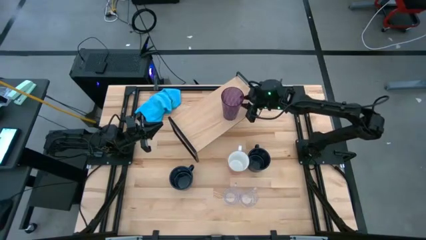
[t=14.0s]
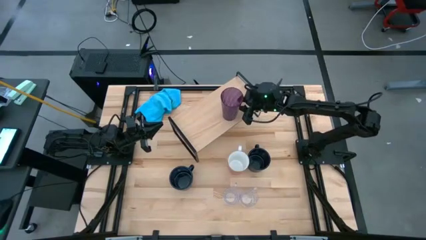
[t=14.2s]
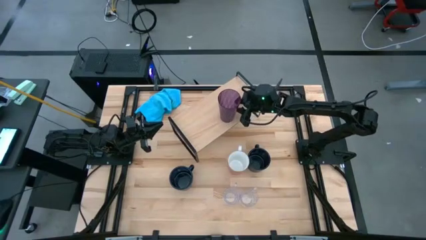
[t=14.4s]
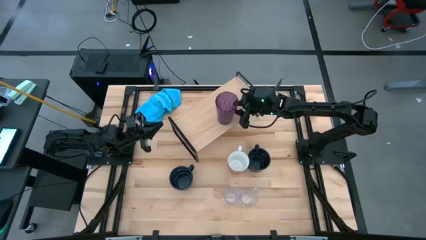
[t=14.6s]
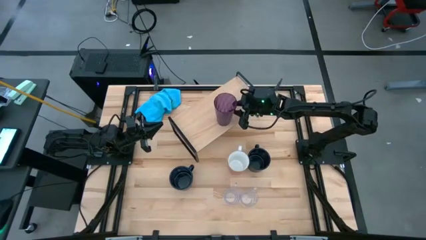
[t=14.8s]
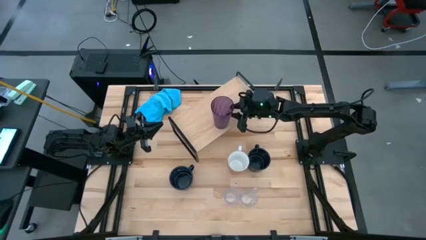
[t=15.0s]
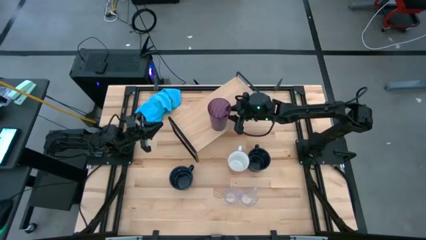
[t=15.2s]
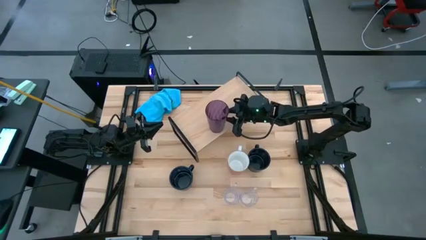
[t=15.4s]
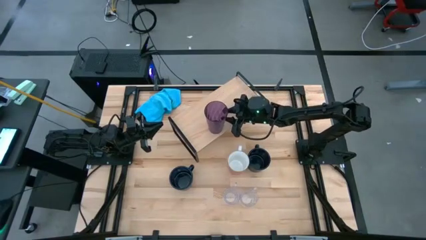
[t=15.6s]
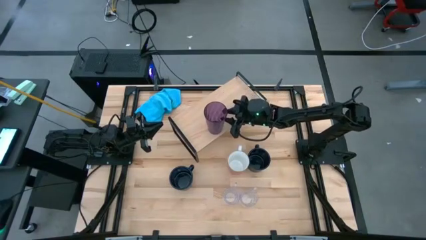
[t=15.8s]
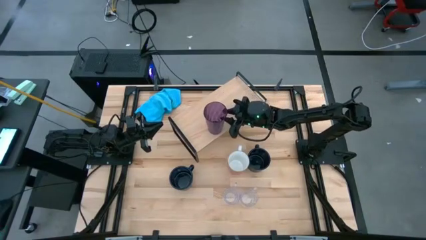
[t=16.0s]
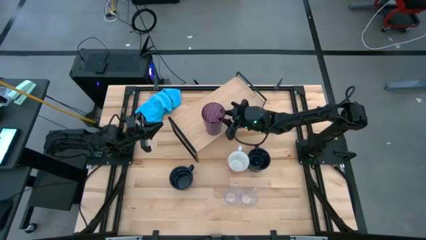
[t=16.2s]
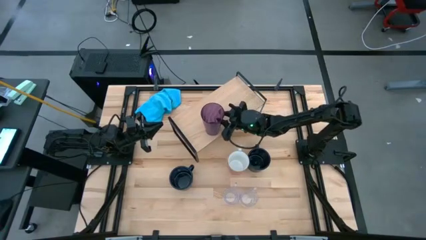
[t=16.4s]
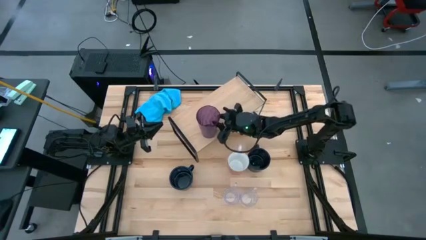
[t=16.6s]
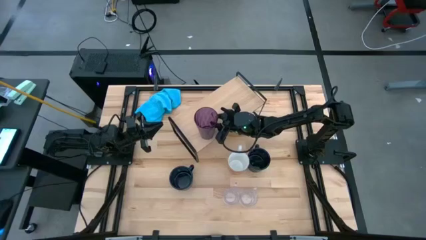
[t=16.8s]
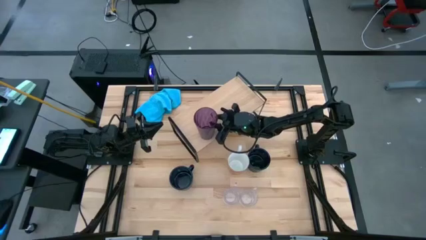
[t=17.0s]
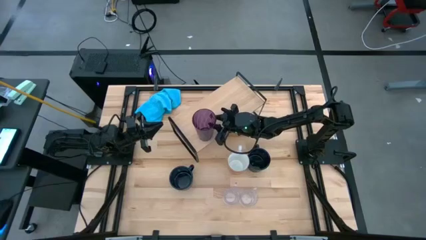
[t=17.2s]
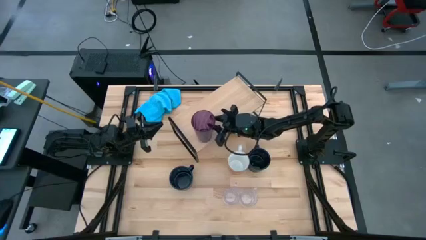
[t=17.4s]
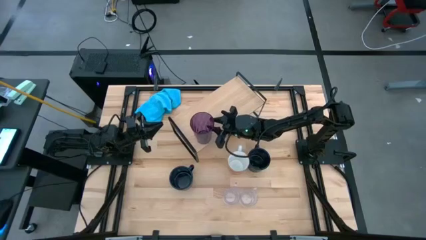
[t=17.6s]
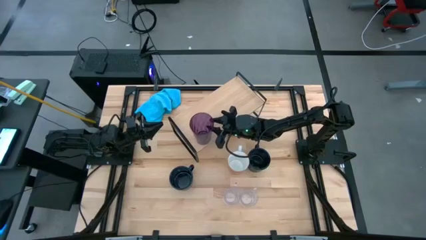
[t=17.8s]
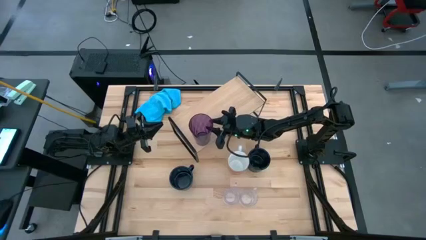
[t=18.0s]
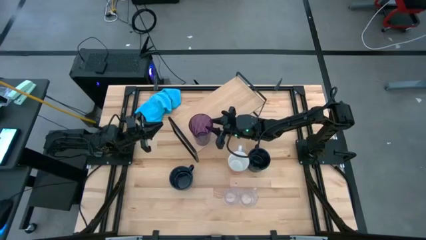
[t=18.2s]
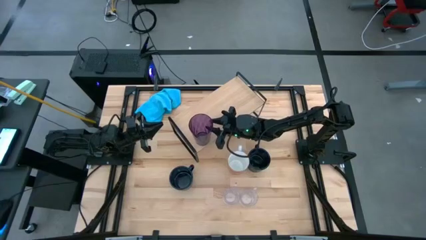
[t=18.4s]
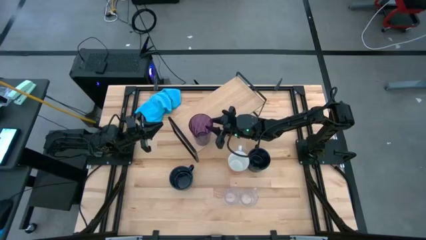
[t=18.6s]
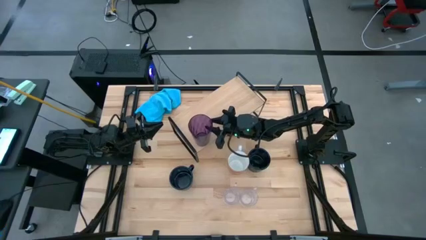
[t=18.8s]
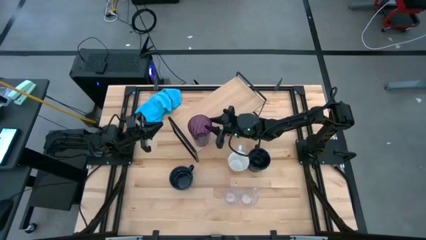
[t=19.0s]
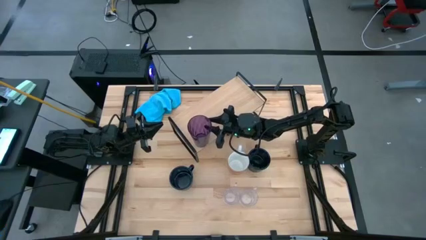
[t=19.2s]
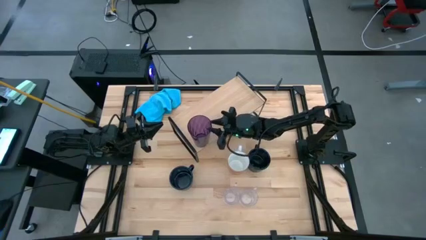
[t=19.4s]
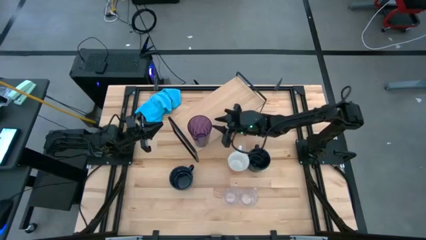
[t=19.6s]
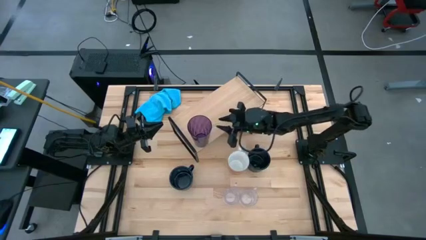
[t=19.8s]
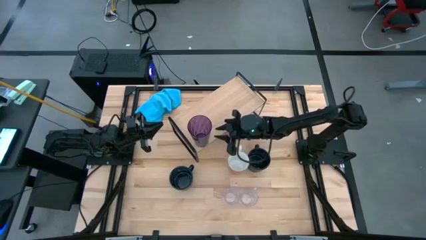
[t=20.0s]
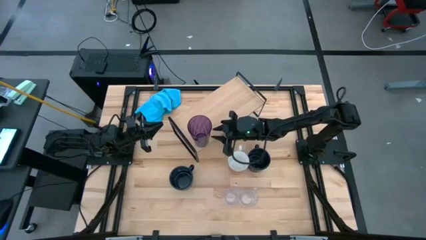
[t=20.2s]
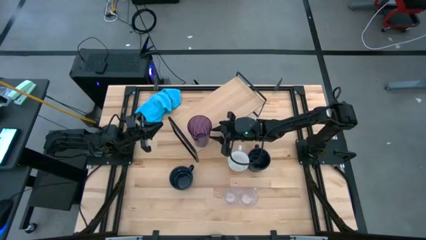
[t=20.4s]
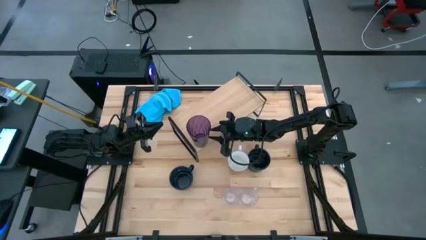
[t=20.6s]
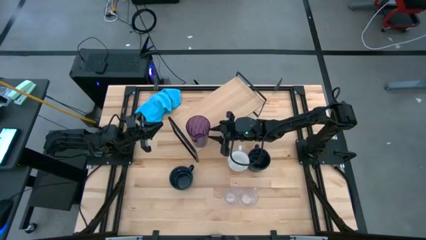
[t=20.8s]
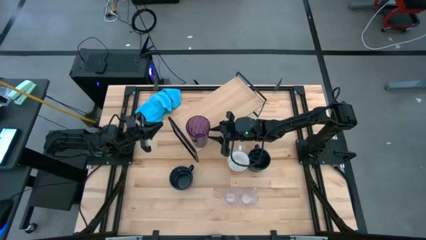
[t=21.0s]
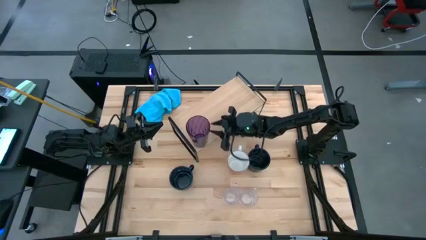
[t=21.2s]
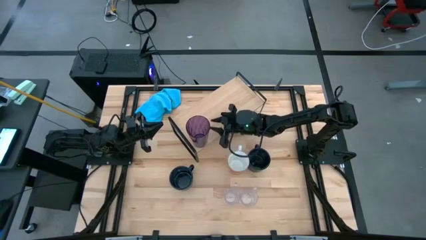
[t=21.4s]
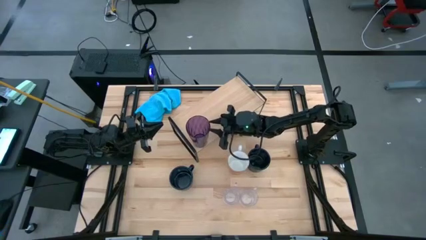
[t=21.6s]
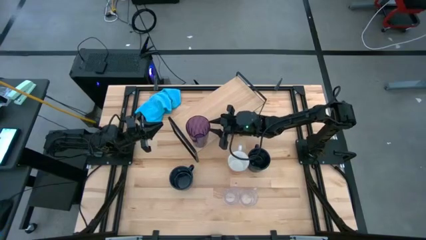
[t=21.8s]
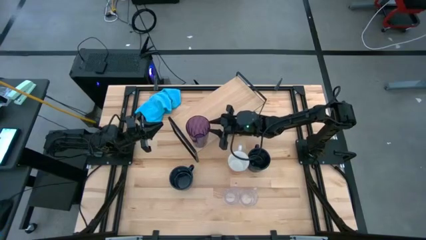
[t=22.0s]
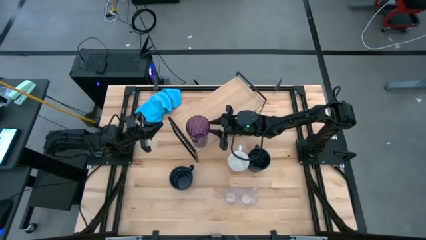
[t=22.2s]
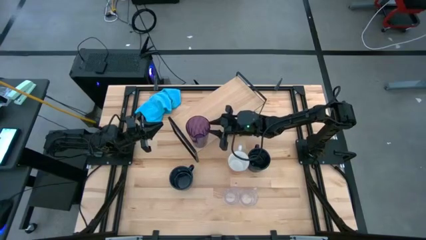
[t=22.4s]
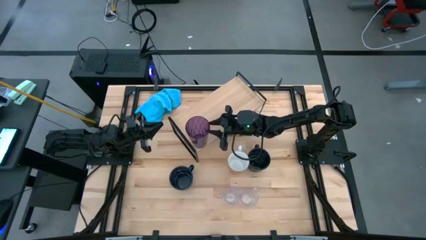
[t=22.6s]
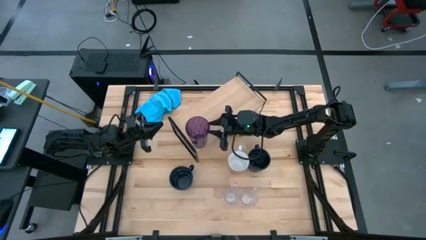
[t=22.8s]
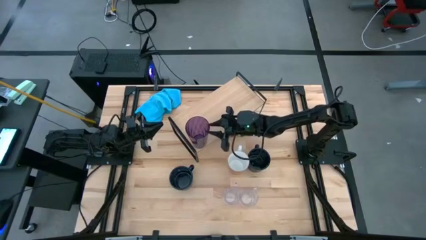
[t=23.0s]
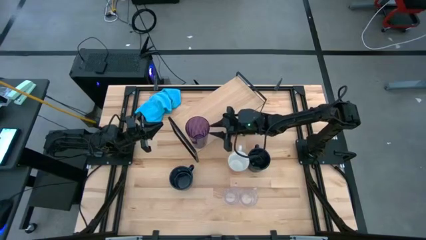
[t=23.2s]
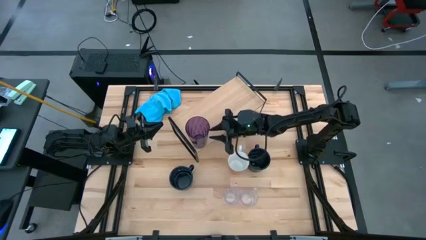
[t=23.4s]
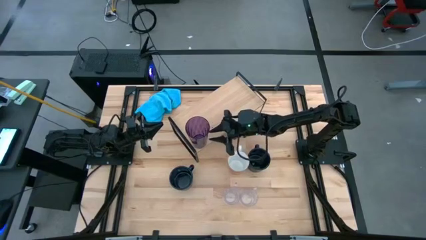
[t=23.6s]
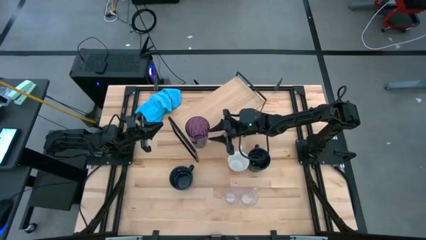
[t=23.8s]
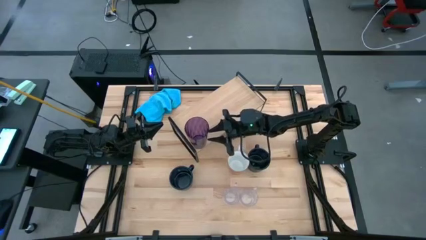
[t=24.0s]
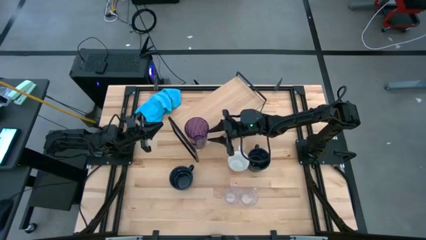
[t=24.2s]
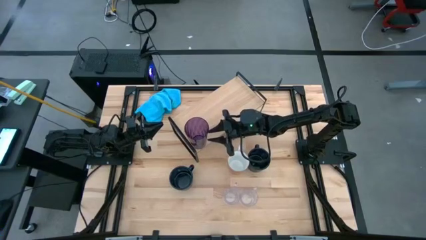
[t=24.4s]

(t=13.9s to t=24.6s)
Task: Stack small to large cups/mugs on shelf
Put the purple cup on the shelf
